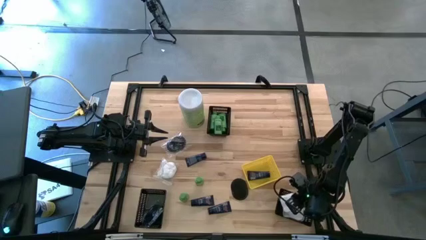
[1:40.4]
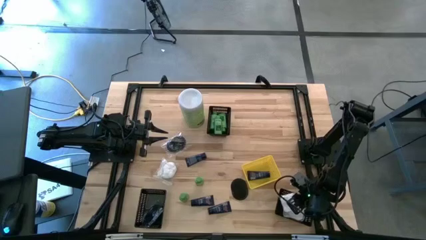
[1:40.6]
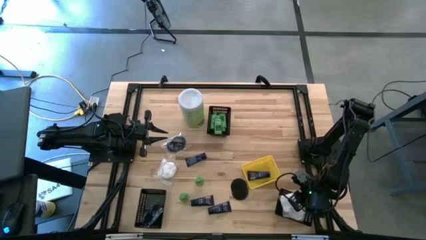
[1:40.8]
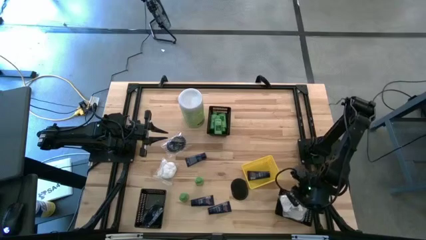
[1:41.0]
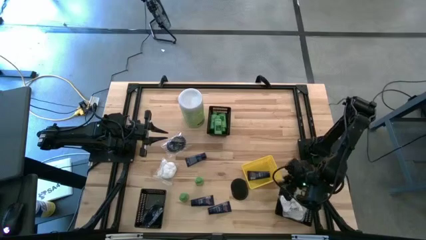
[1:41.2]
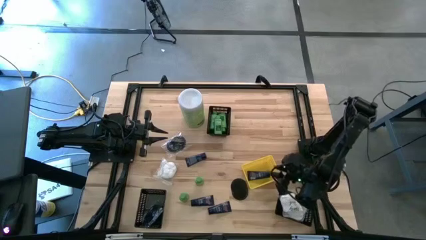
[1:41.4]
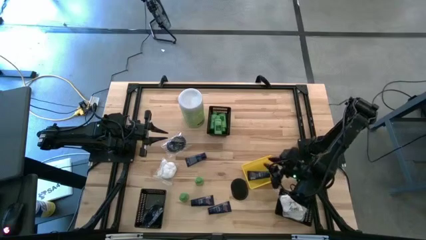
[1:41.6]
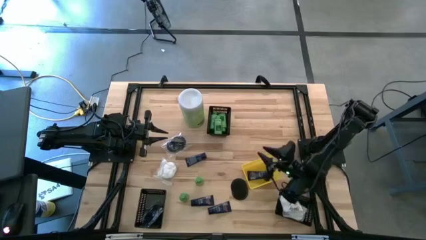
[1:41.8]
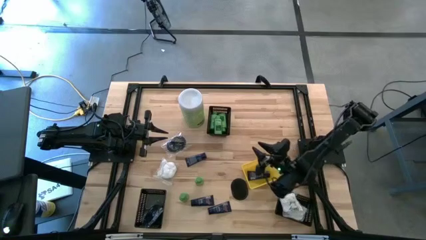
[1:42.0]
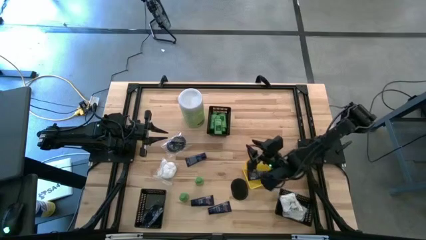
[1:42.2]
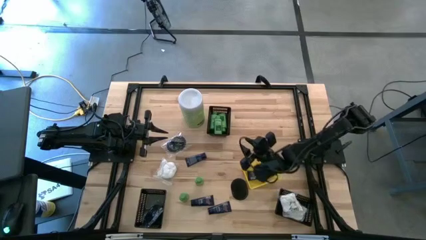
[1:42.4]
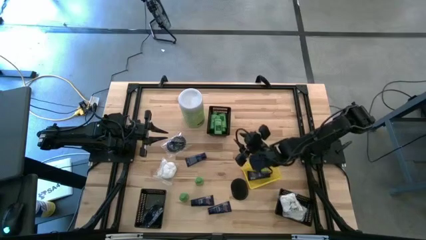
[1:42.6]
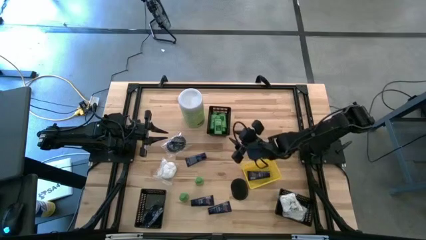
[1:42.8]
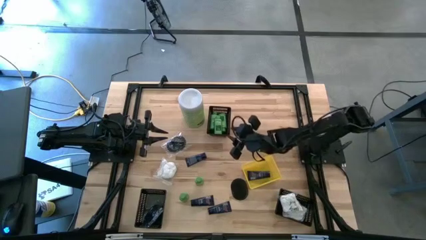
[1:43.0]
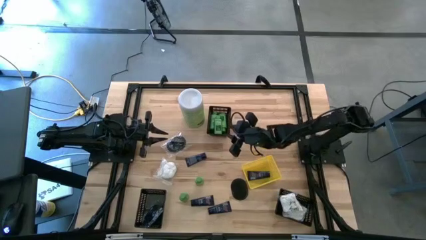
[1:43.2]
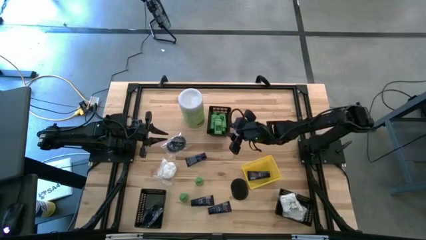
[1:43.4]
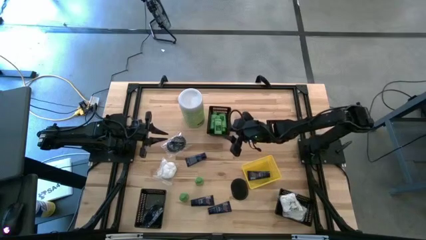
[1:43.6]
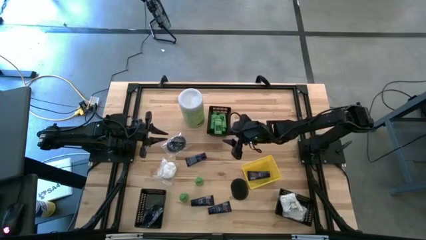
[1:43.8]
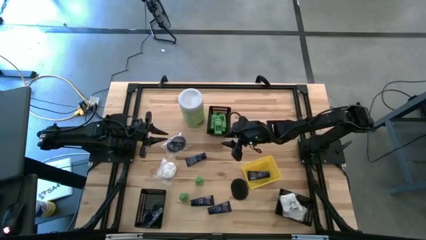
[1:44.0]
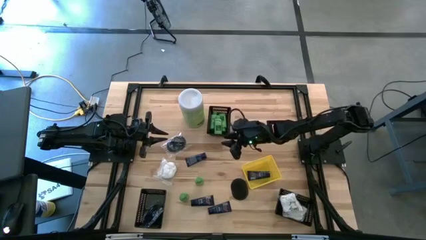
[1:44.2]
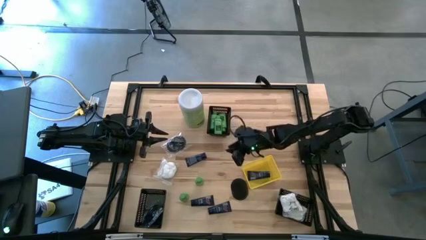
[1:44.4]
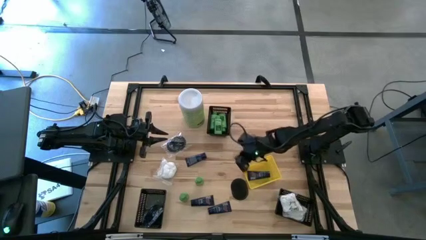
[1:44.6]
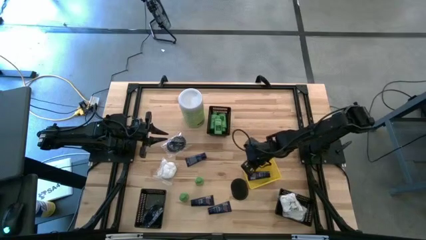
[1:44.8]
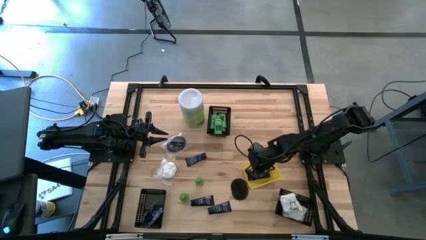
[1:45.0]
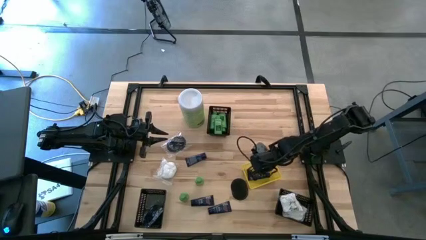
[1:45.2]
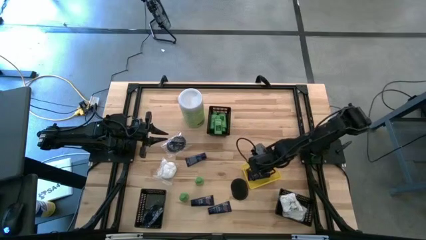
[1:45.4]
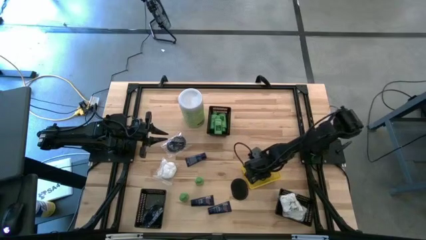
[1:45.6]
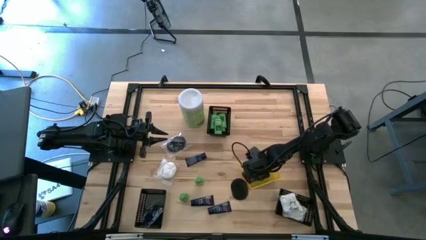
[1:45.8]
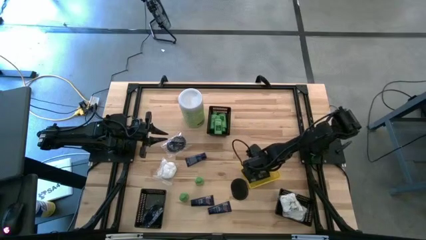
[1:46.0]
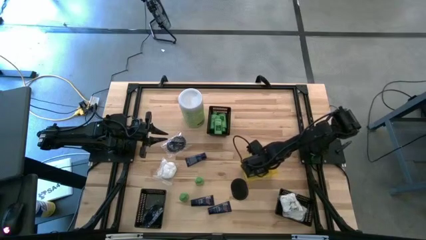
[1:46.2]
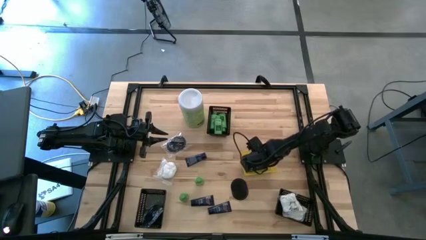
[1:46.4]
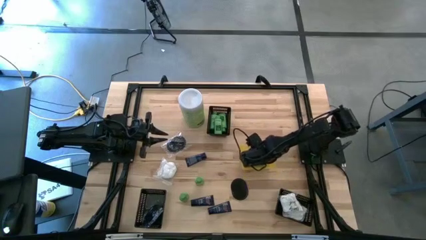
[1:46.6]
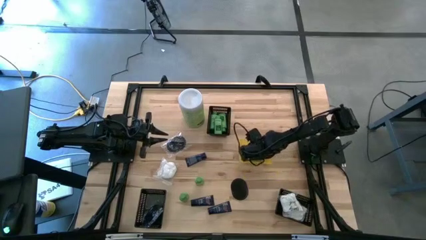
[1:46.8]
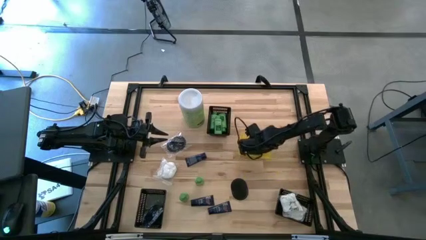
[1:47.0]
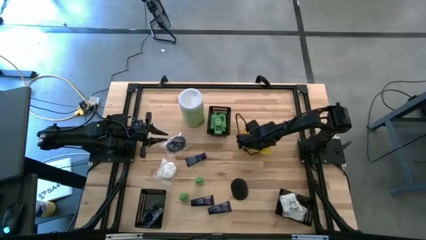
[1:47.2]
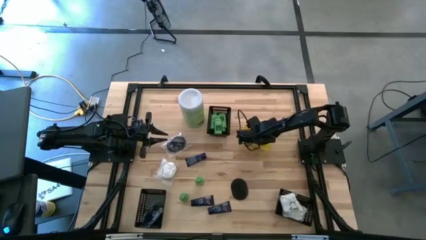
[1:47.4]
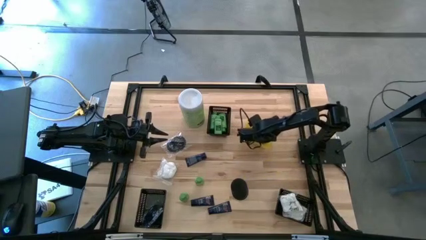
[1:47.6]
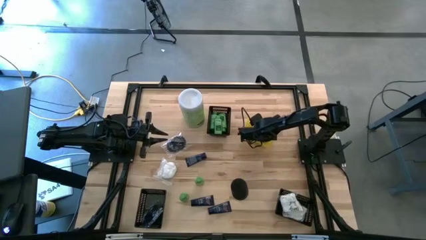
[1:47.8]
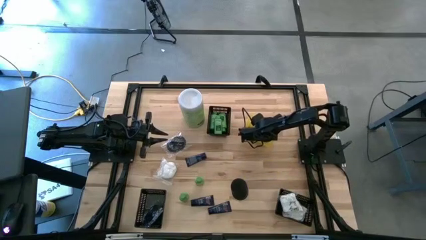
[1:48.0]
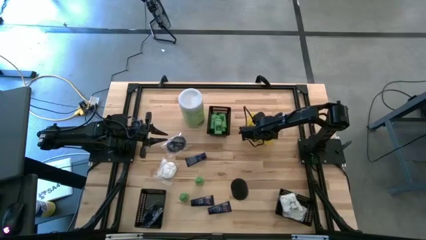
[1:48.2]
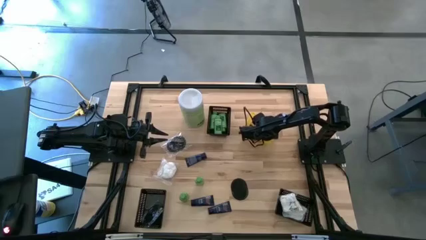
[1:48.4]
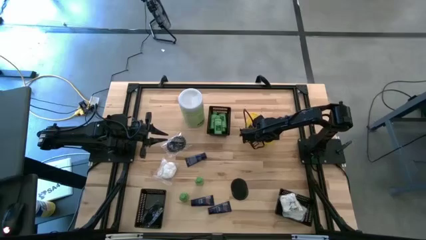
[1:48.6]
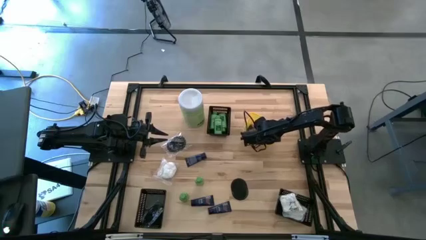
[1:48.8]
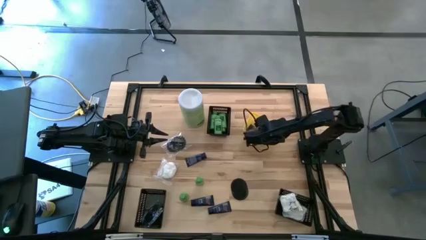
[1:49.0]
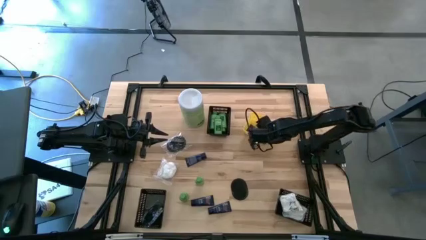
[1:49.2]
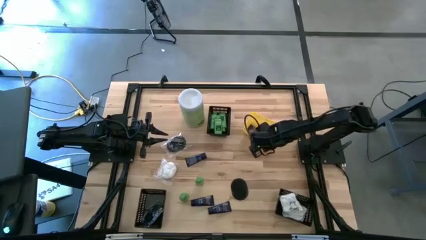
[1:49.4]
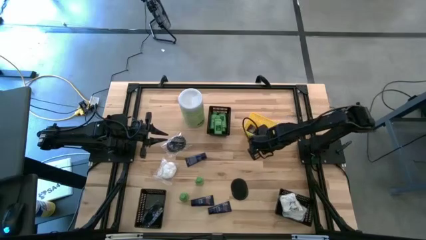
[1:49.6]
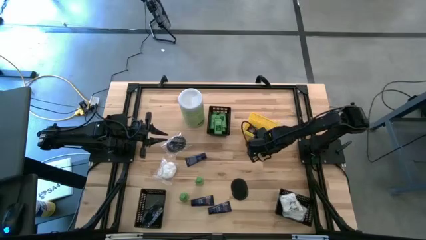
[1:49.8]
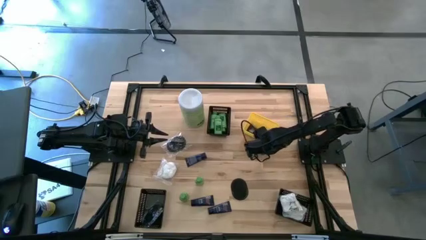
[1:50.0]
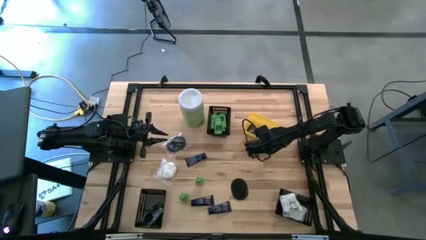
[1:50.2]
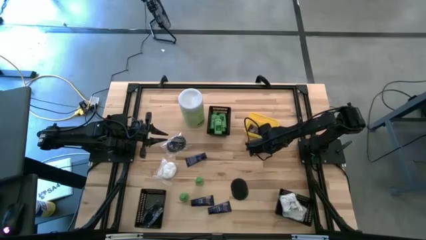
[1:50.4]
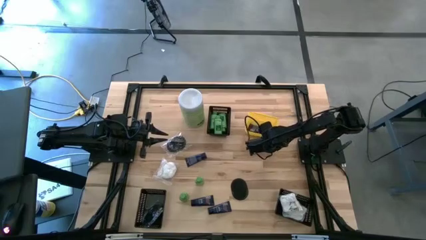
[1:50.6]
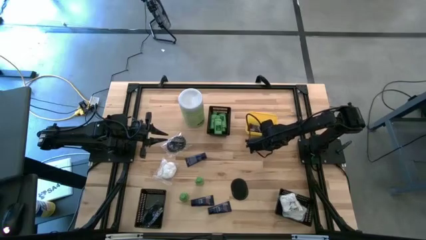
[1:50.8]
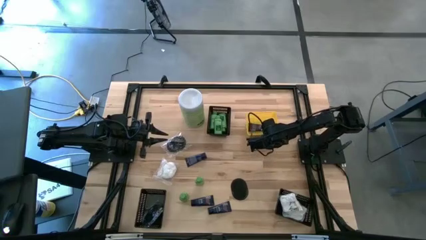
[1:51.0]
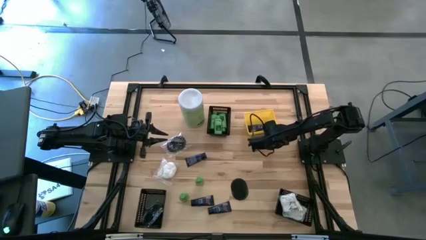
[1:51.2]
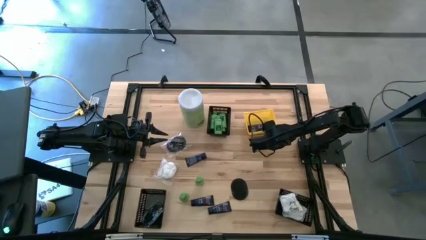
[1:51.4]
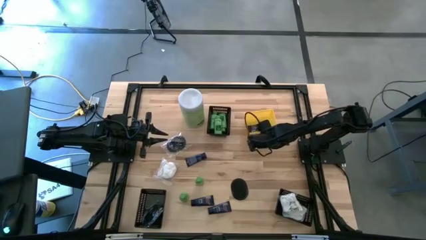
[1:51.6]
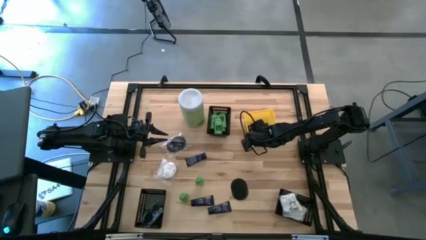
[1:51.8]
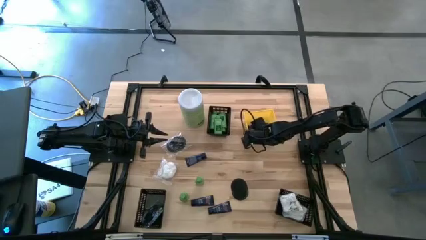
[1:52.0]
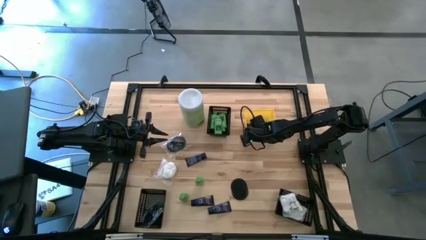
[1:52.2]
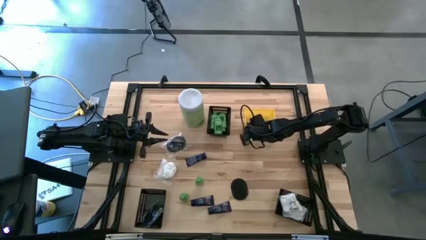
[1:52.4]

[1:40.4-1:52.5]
Task: Pick & Place Travel size toiletries
Move the yellow bin to the top right of the table

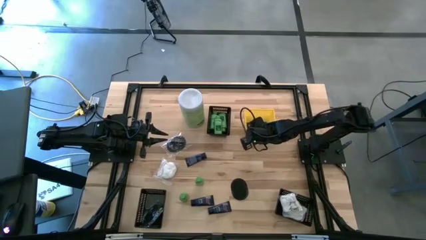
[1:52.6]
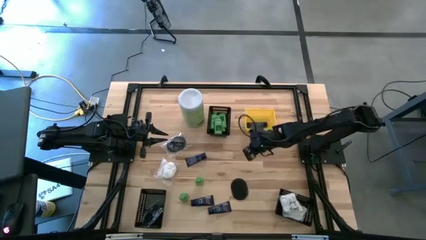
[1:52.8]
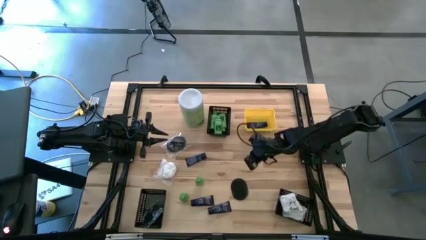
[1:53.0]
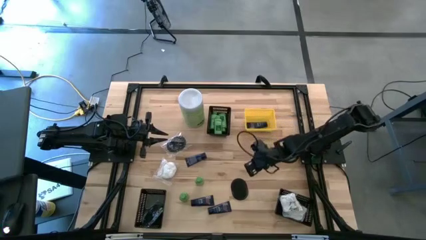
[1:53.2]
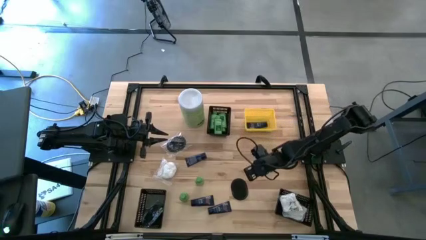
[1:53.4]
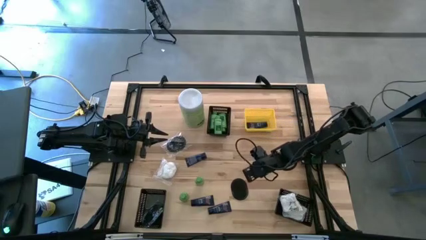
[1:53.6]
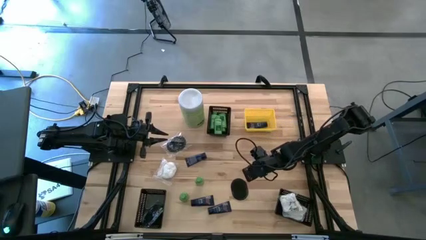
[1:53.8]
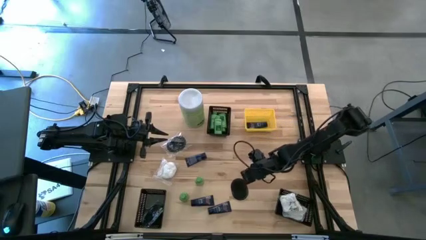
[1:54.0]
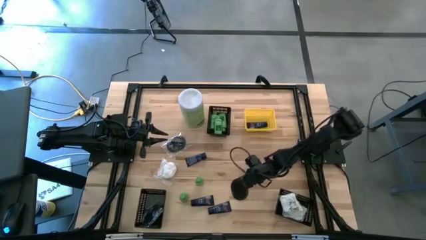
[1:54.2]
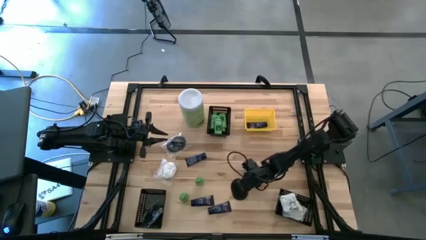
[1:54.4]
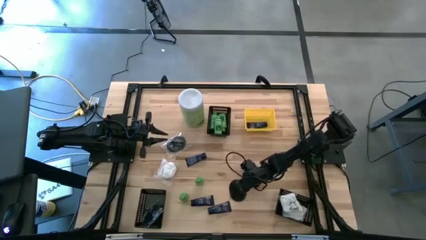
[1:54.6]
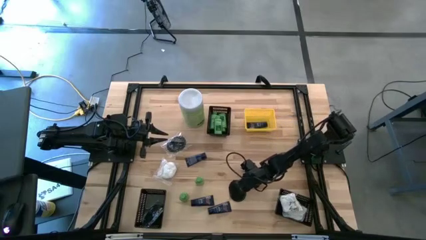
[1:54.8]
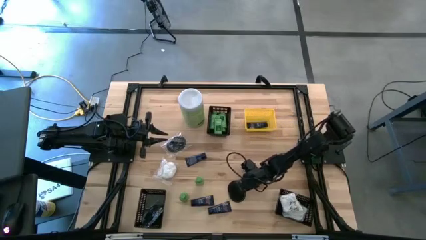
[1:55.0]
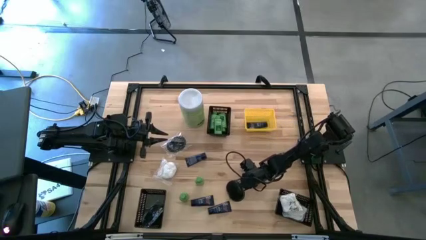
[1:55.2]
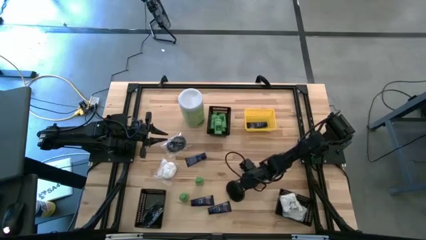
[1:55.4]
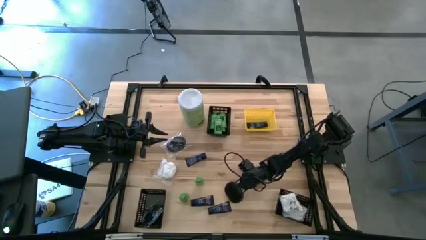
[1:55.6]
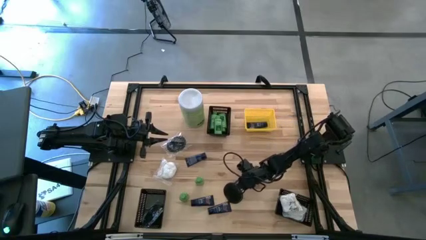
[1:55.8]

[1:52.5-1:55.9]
Put the black hair brush into the bottom left black bin
